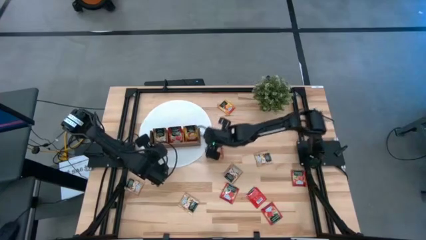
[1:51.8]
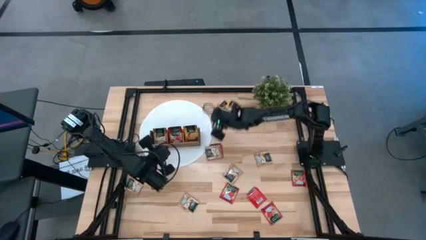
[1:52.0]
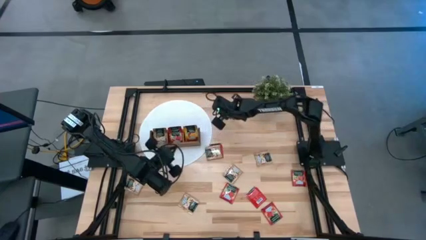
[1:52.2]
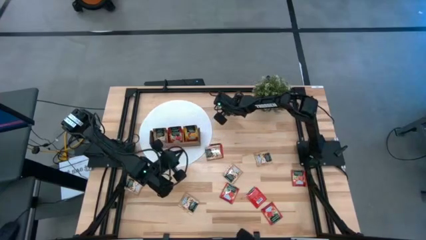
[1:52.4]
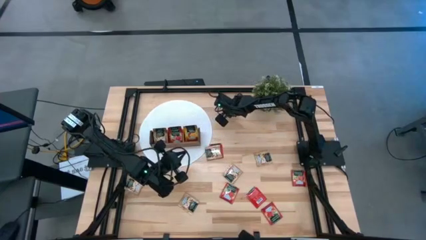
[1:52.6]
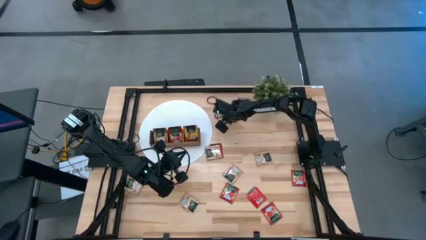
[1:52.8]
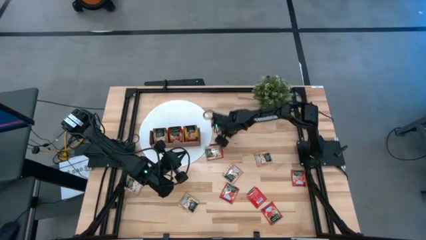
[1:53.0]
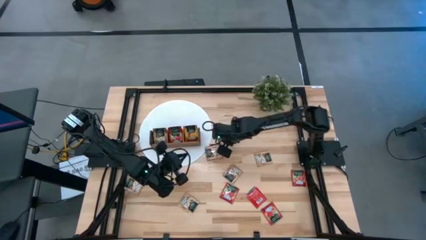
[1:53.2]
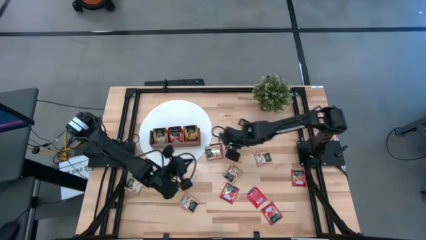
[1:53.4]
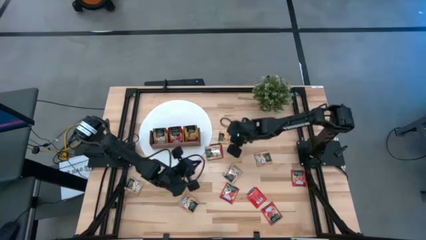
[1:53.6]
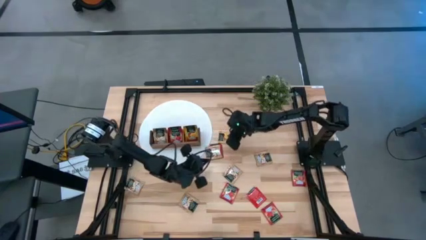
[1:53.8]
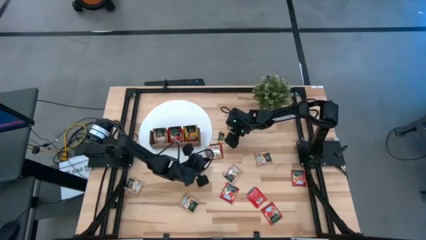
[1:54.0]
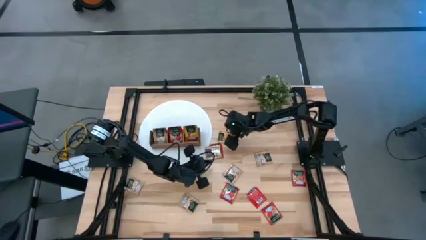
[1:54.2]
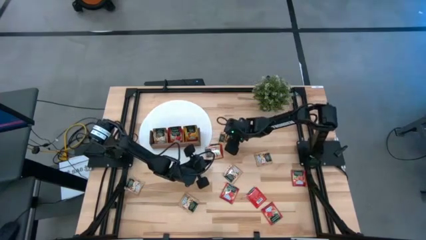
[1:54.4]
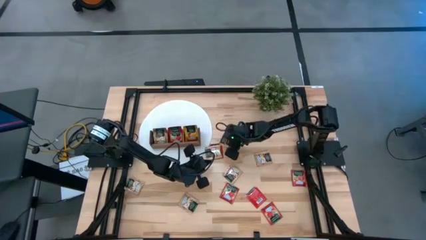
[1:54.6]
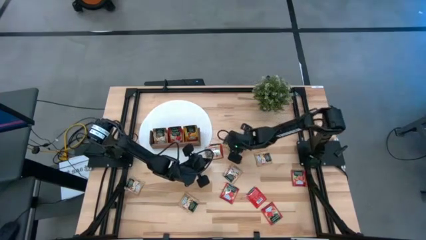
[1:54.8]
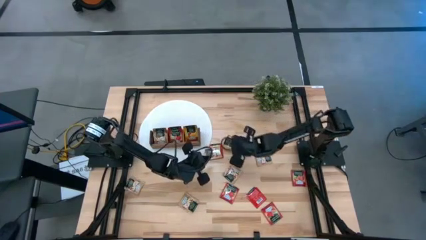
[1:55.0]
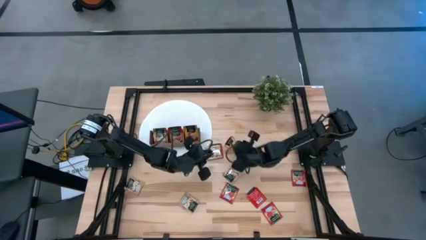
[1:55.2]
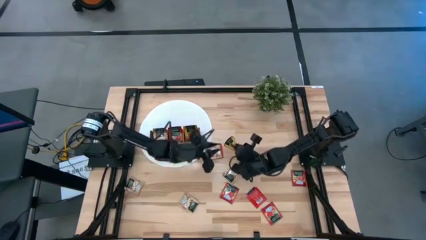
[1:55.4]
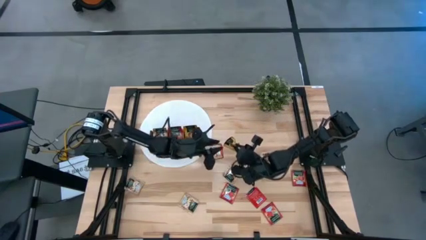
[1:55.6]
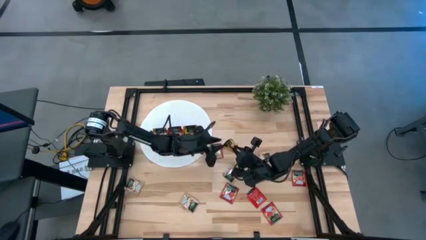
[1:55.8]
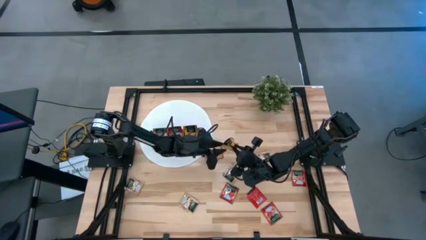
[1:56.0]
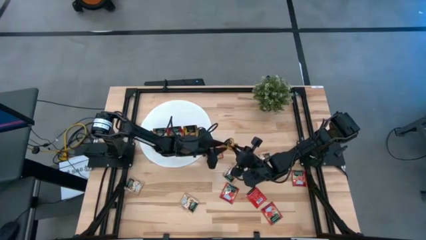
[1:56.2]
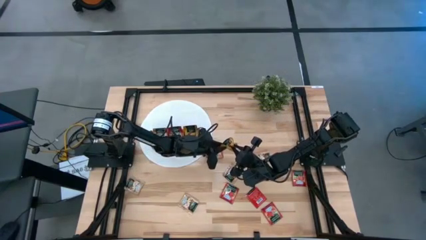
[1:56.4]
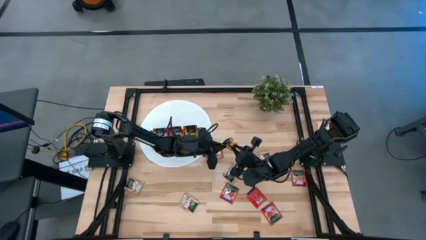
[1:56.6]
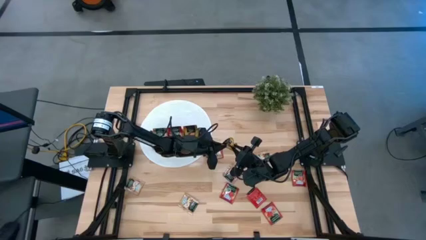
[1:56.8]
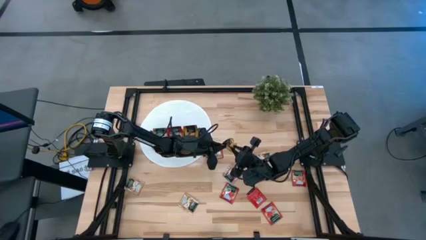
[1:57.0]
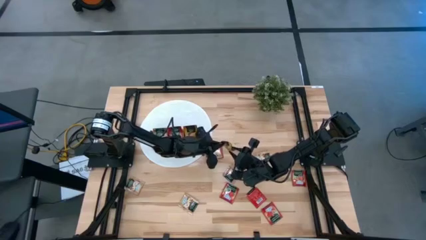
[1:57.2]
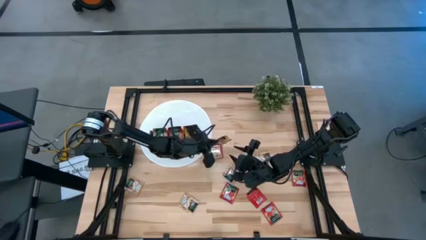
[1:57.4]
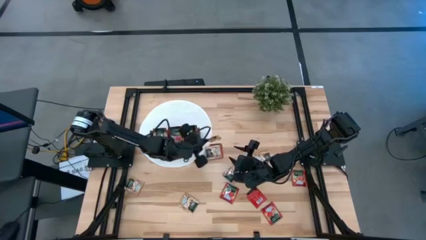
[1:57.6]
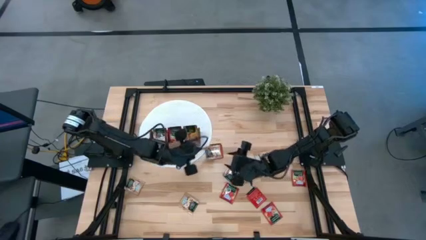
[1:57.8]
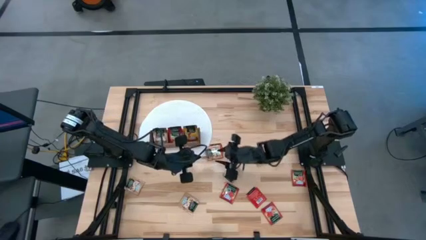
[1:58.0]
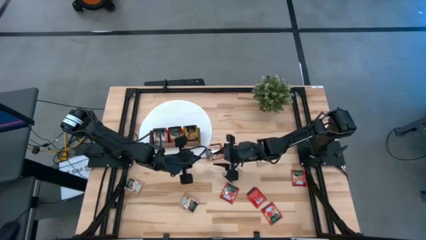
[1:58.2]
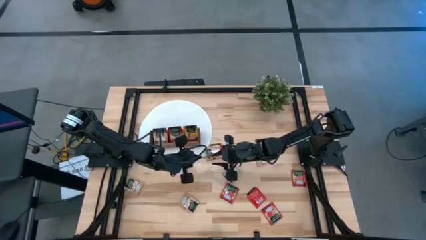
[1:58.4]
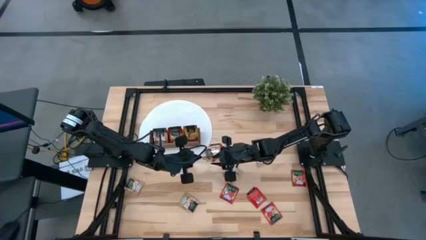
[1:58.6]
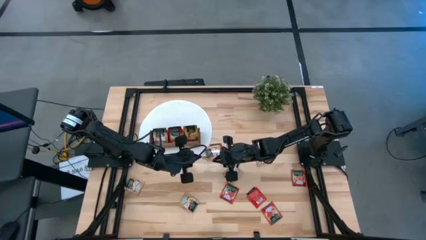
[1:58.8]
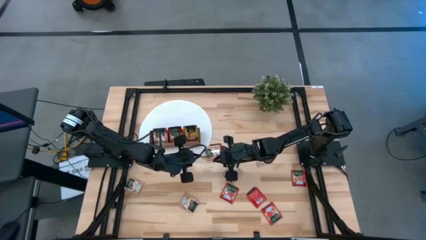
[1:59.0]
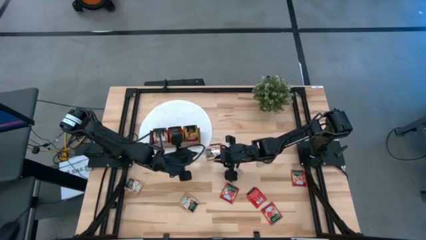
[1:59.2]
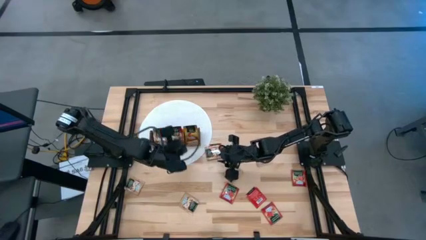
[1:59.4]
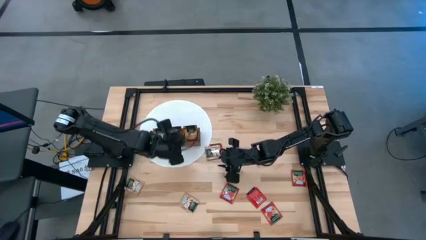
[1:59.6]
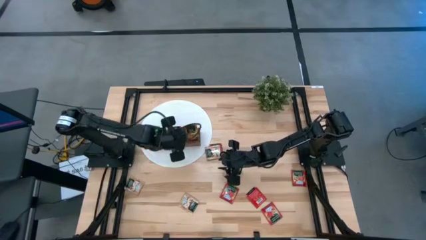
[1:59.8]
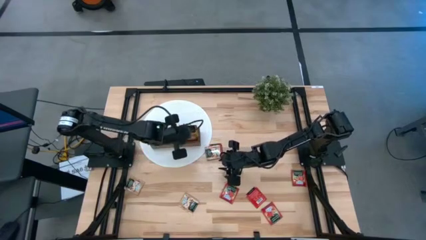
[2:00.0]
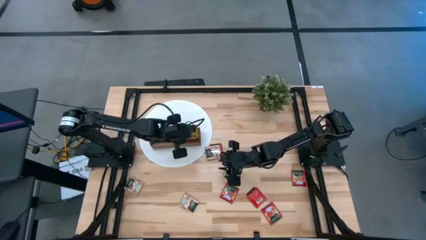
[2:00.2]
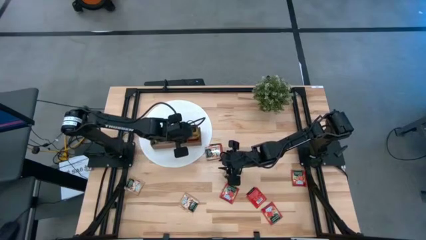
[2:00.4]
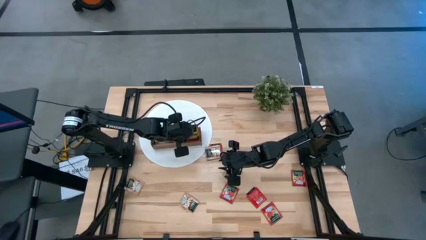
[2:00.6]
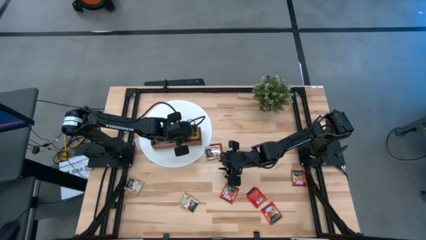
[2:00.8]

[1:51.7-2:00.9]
Task: Pick & Place Tea
Put the yellow tea bag into the right section of the wooden organizer

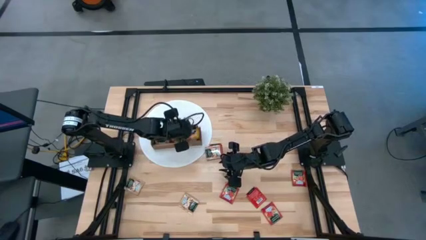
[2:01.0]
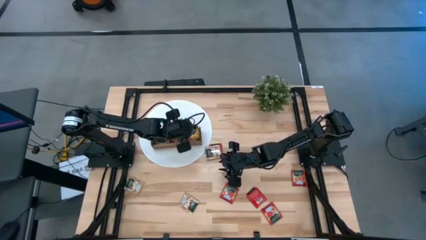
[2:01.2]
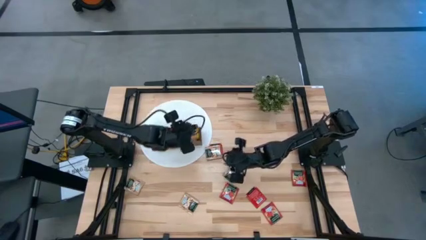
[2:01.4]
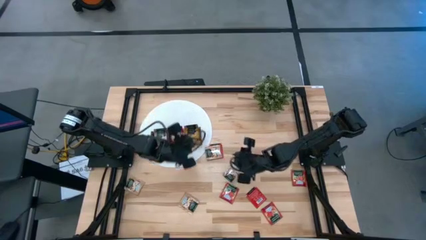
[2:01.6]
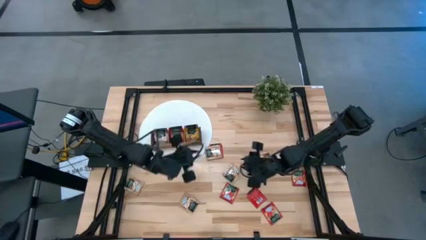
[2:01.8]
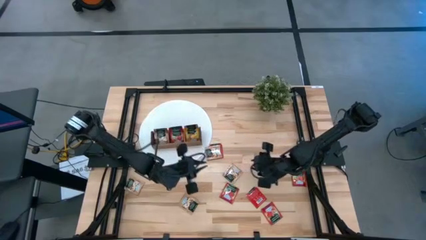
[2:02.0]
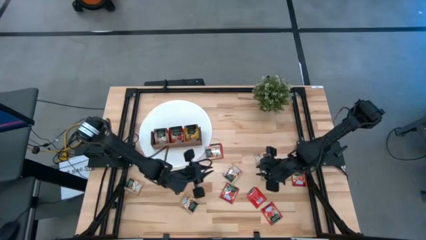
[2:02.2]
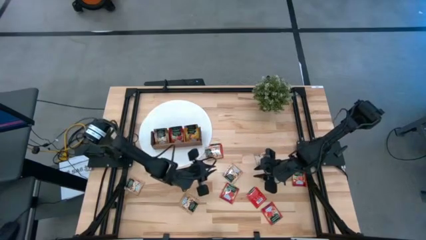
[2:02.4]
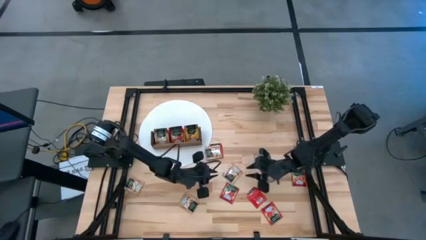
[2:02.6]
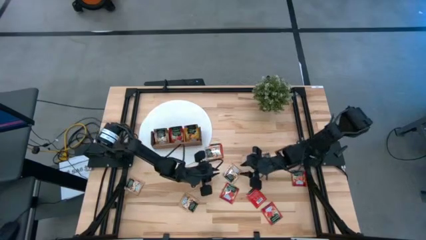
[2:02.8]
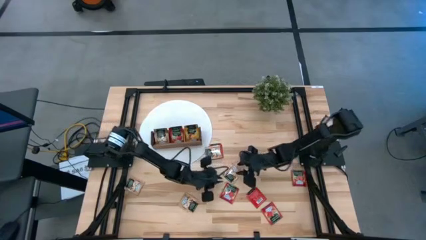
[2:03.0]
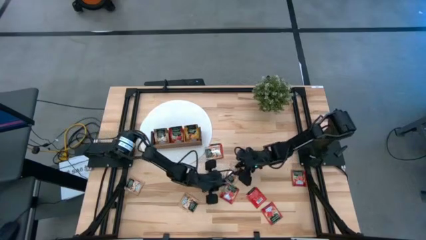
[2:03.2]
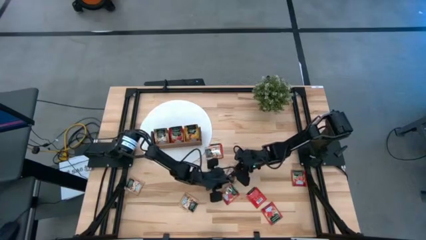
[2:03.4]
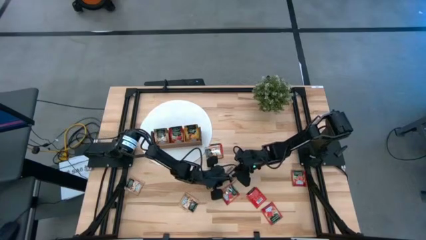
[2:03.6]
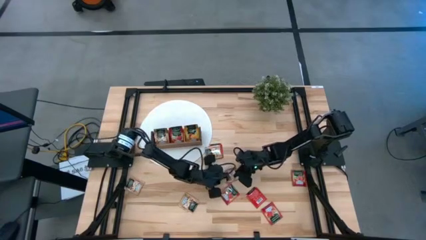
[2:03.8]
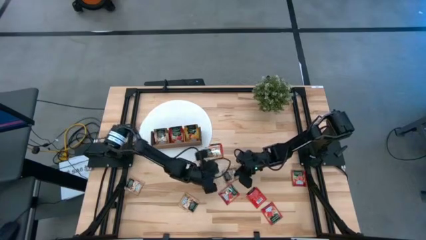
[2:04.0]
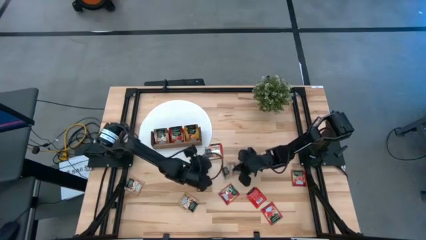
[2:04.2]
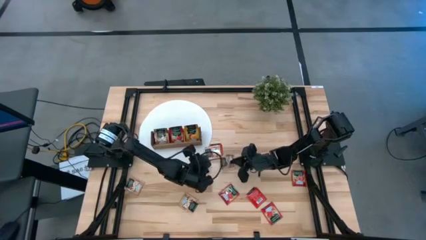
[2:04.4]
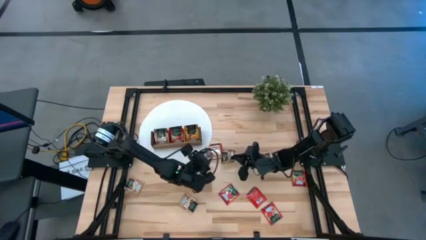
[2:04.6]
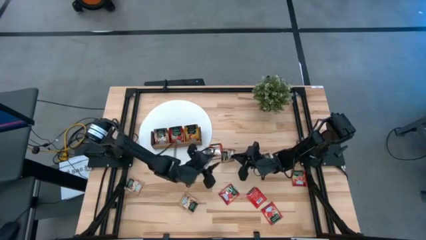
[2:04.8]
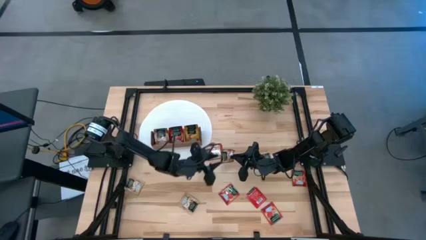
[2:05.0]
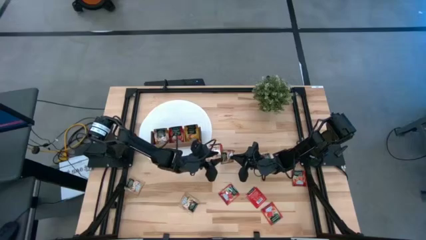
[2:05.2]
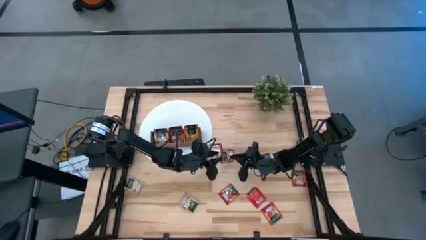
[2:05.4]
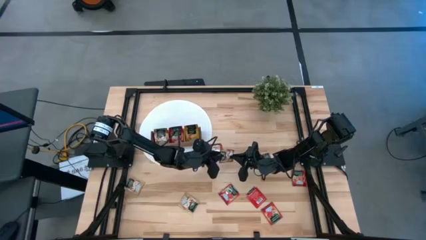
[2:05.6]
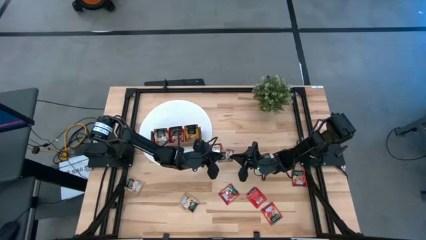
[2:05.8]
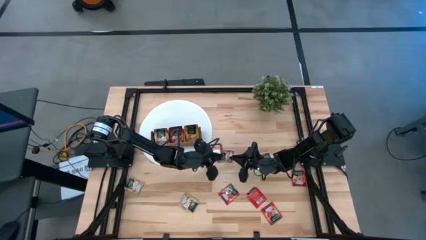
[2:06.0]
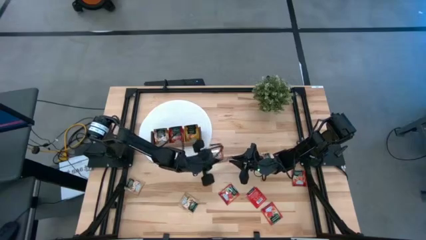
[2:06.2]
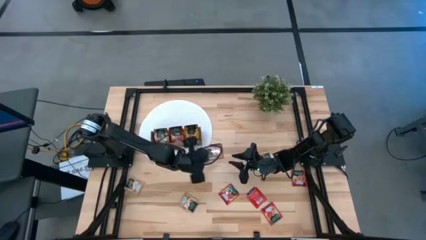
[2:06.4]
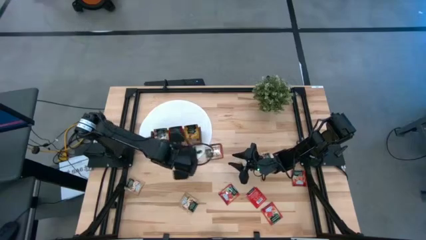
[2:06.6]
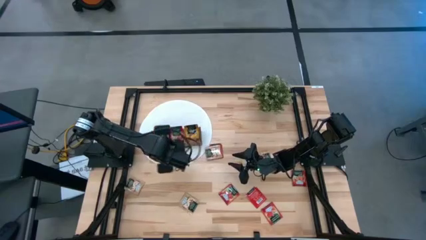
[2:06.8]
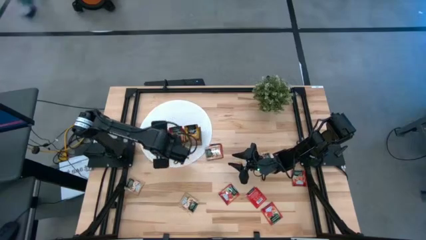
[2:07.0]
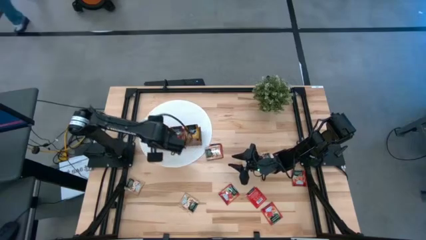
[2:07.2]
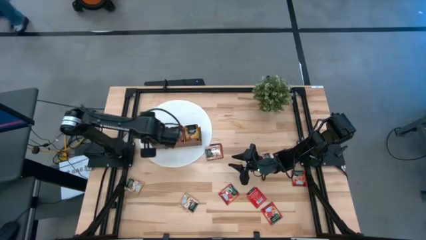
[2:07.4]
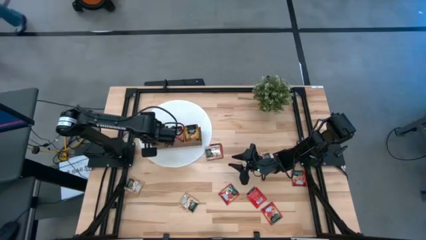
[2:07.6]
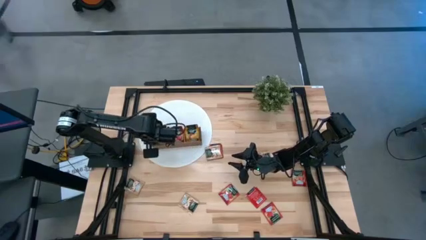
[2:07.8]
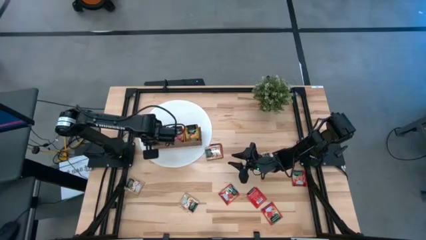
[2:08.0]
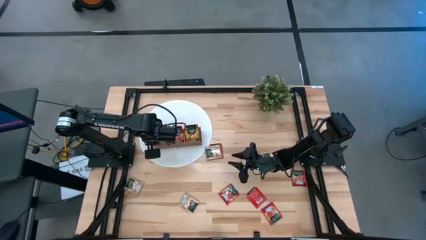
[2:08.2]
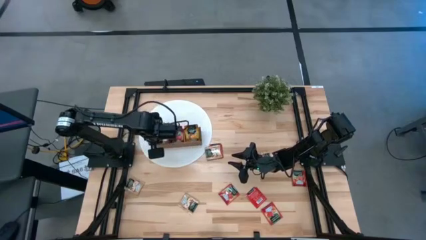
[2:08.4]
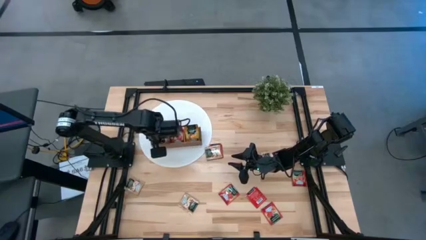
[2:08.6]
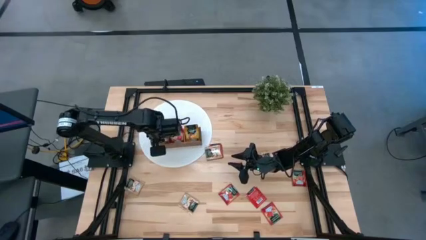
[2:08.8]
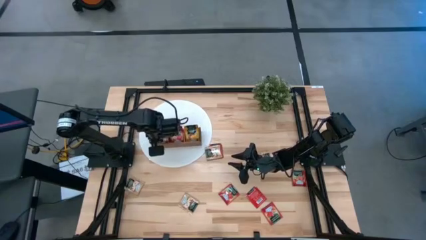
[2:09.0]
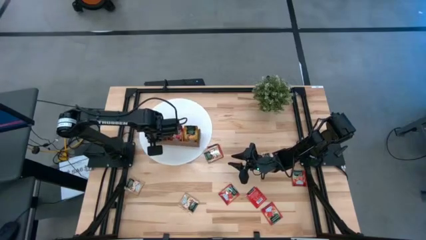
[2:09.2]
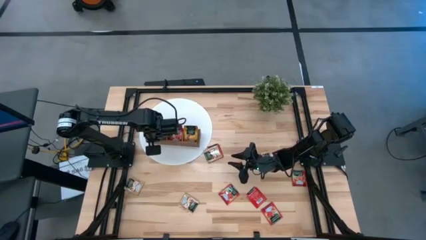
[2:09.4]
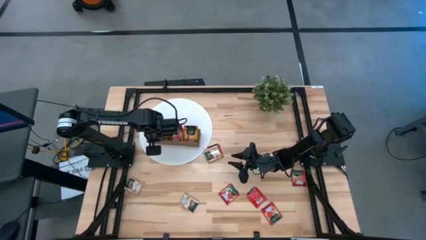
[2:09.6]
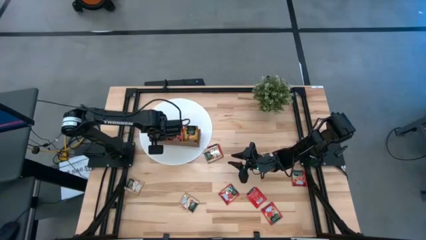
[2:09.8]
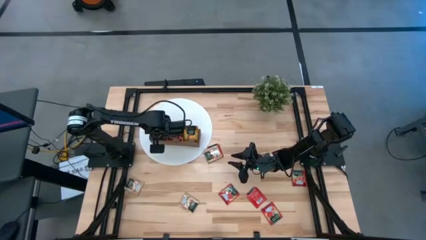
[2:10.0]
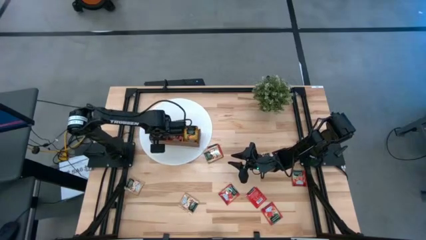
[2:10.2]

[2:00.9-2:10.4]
Put the brown tea bag into the left section of the wooden organizer
